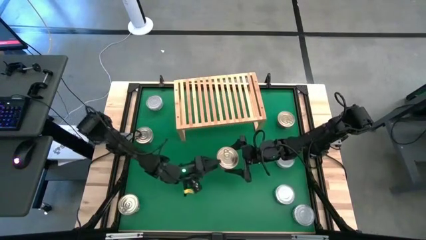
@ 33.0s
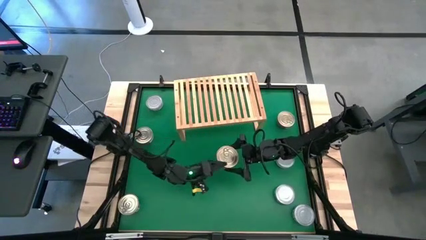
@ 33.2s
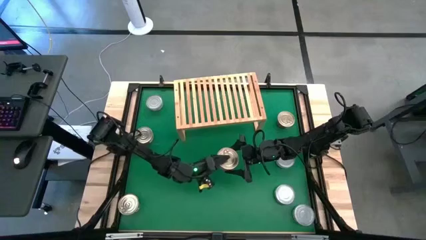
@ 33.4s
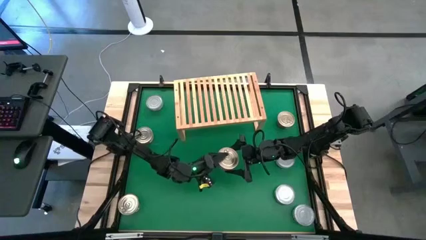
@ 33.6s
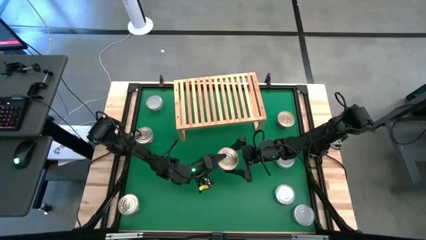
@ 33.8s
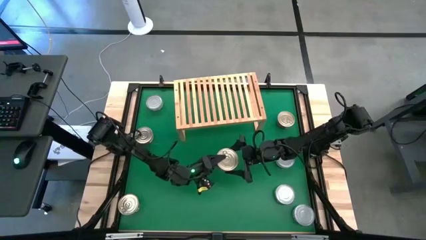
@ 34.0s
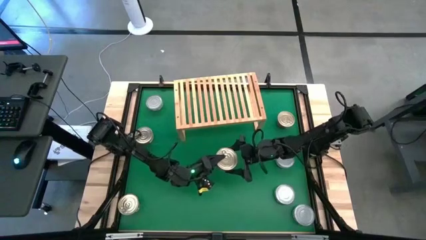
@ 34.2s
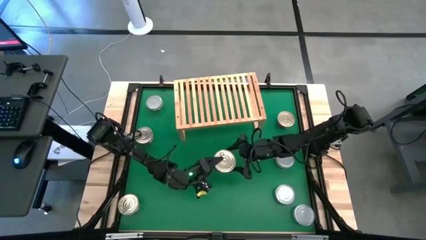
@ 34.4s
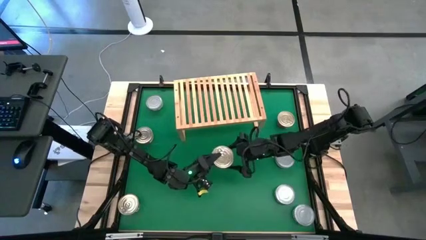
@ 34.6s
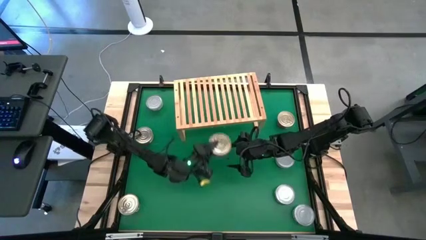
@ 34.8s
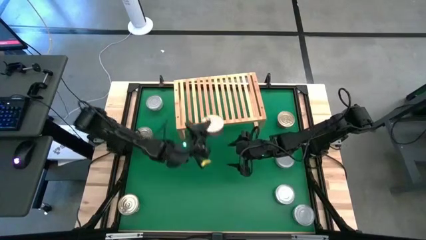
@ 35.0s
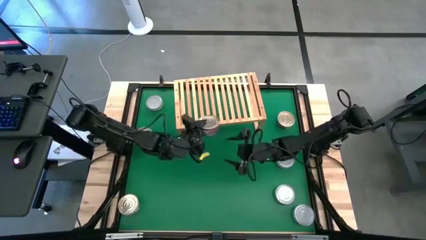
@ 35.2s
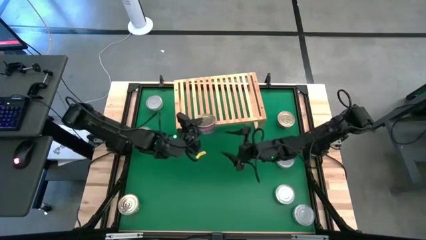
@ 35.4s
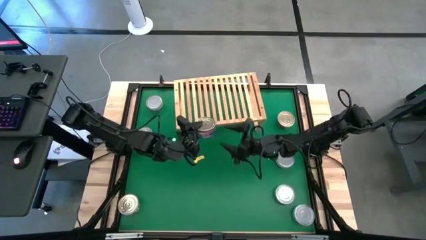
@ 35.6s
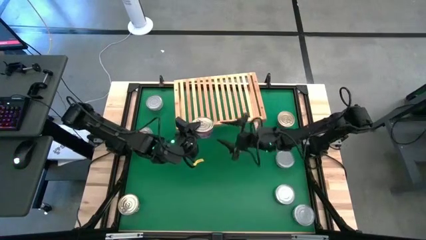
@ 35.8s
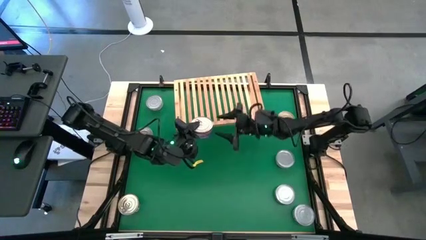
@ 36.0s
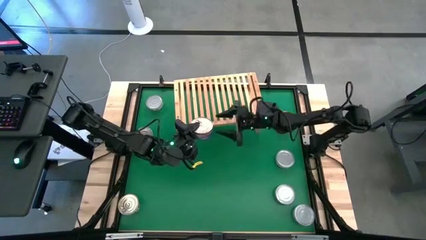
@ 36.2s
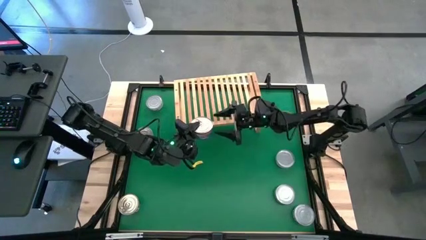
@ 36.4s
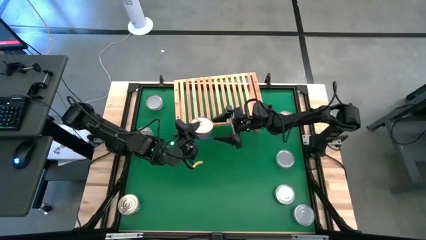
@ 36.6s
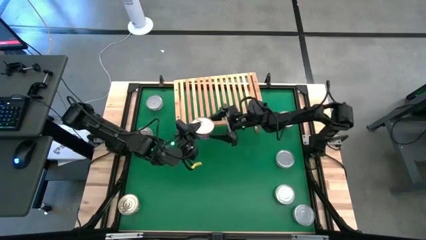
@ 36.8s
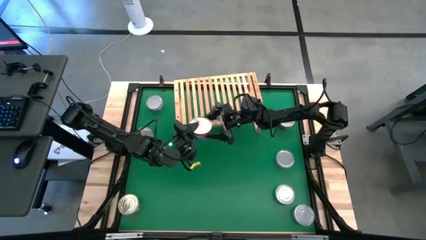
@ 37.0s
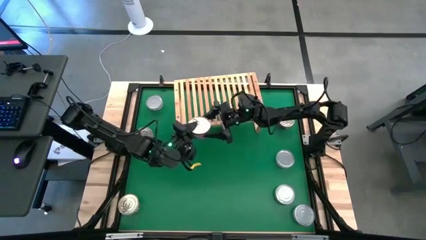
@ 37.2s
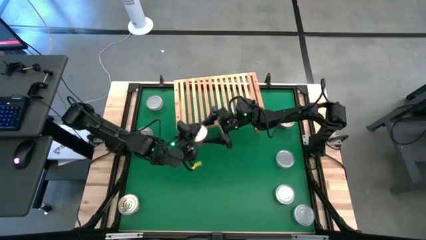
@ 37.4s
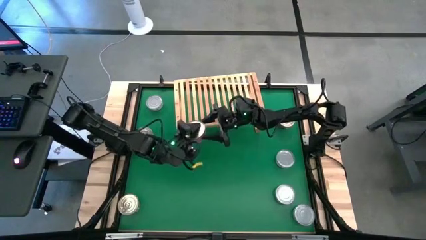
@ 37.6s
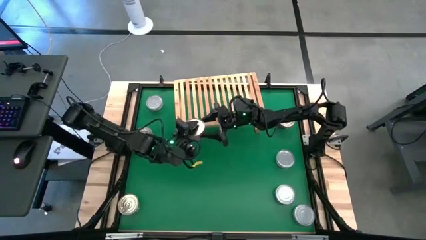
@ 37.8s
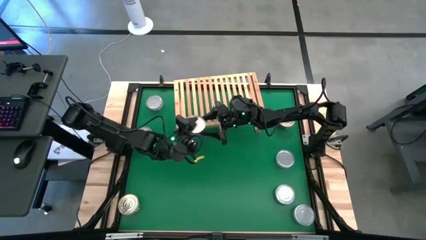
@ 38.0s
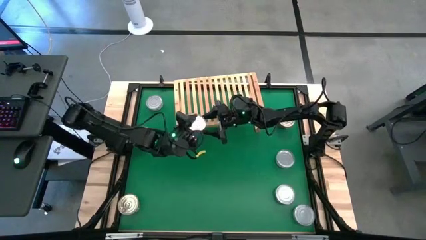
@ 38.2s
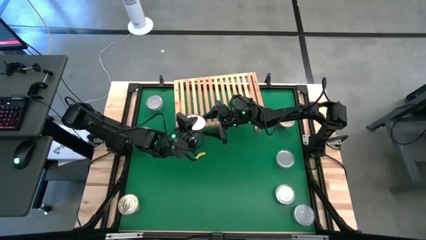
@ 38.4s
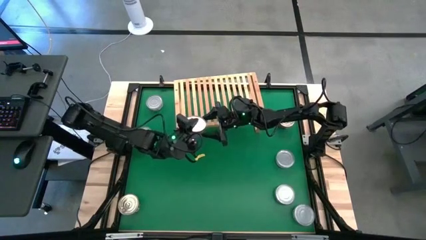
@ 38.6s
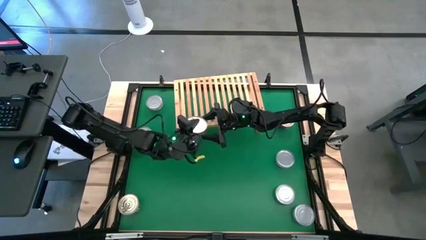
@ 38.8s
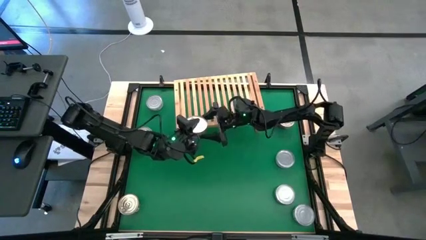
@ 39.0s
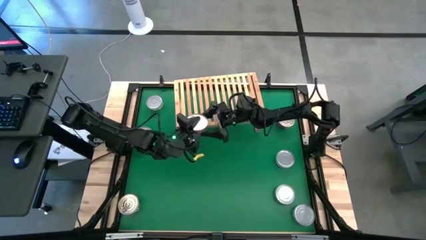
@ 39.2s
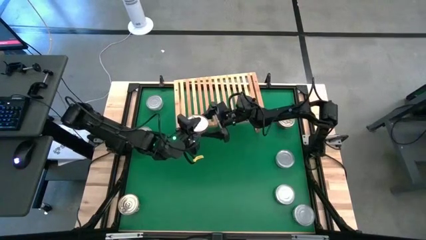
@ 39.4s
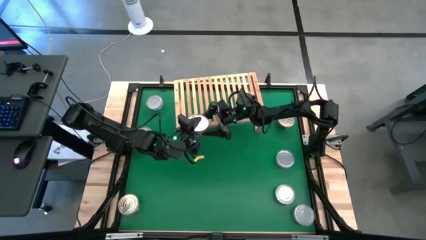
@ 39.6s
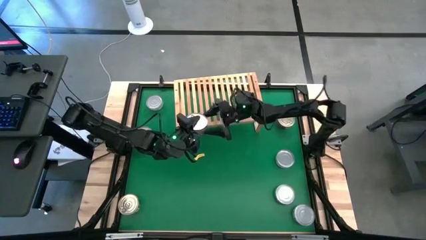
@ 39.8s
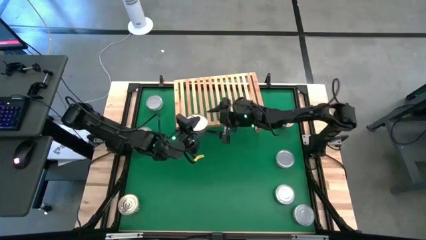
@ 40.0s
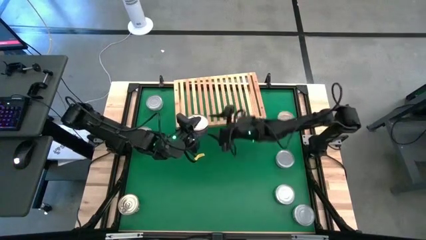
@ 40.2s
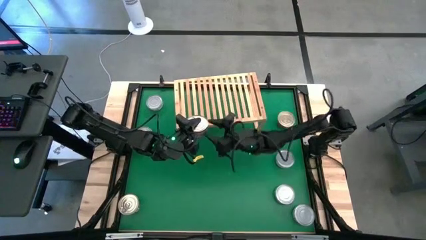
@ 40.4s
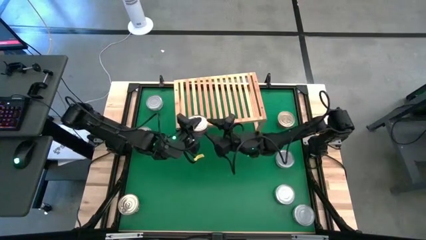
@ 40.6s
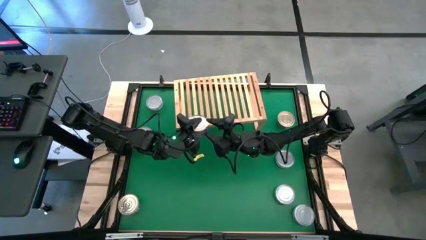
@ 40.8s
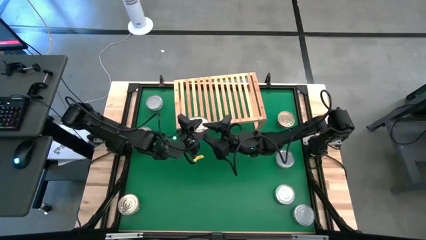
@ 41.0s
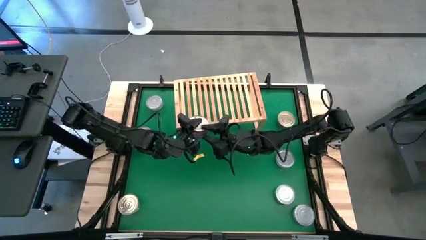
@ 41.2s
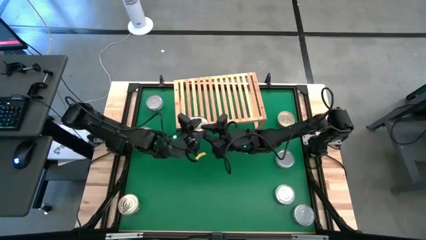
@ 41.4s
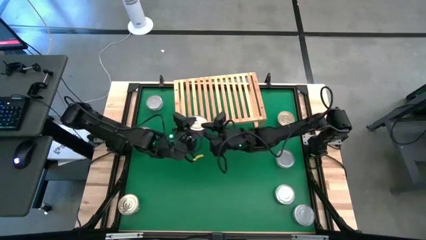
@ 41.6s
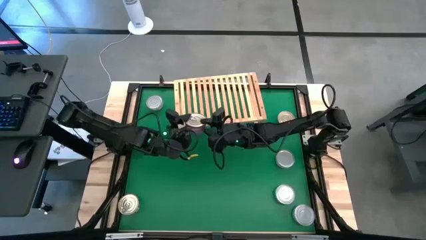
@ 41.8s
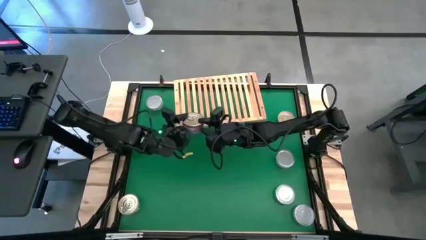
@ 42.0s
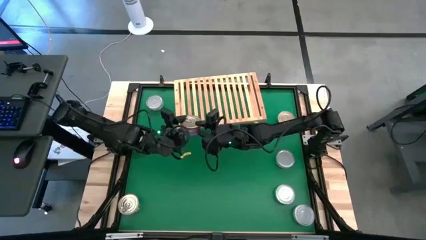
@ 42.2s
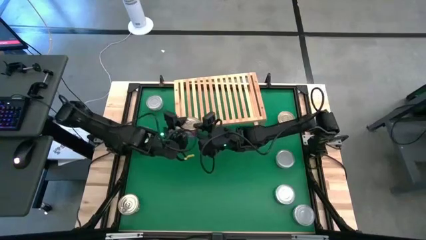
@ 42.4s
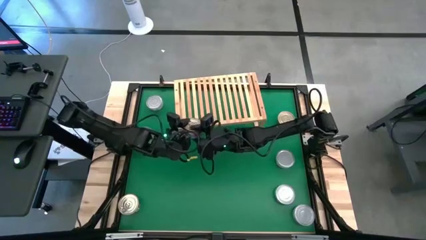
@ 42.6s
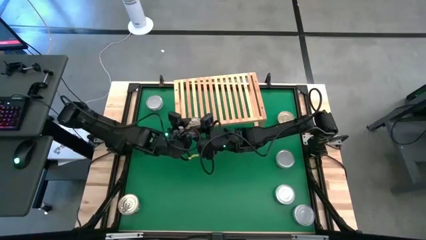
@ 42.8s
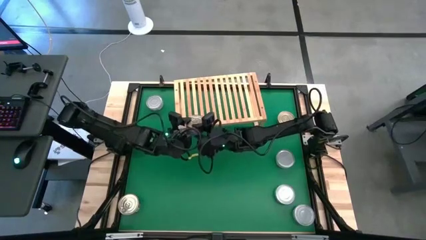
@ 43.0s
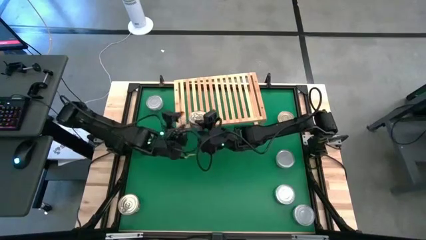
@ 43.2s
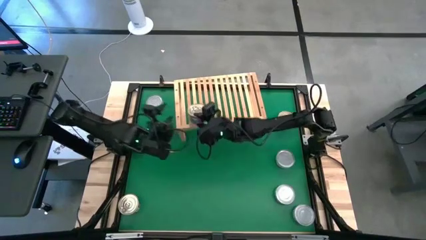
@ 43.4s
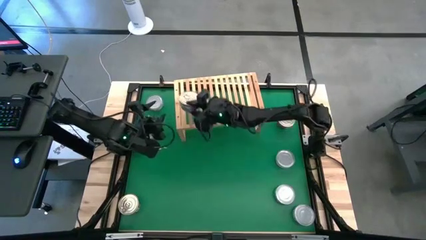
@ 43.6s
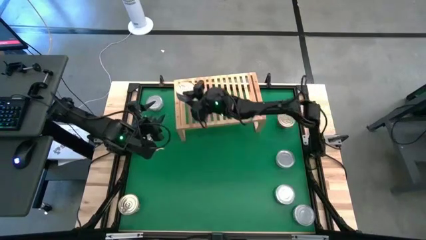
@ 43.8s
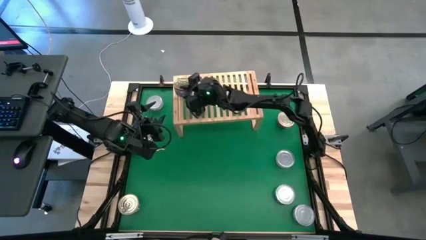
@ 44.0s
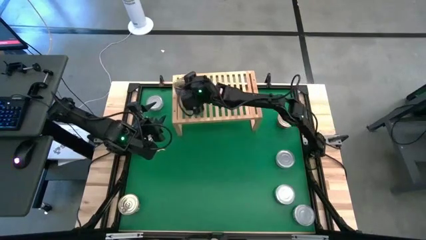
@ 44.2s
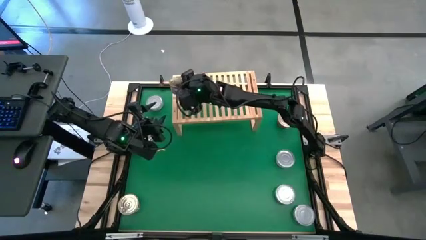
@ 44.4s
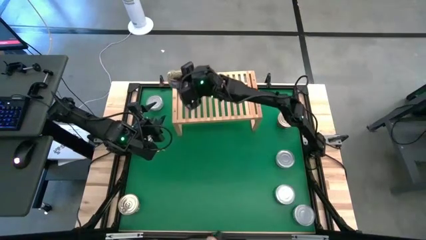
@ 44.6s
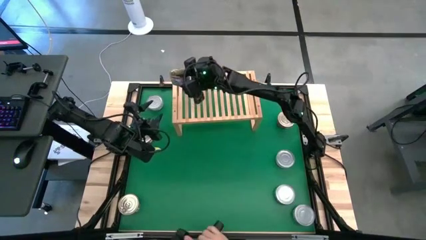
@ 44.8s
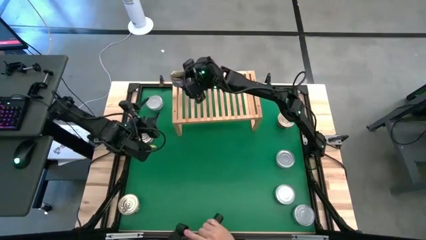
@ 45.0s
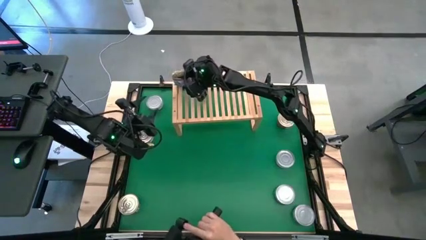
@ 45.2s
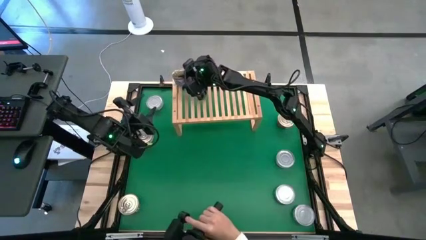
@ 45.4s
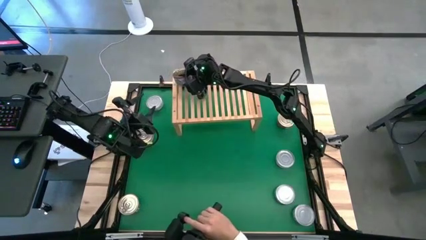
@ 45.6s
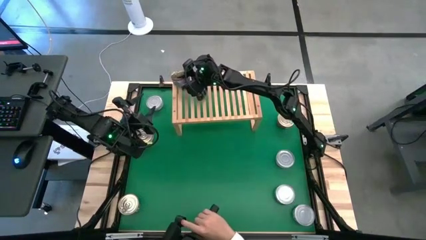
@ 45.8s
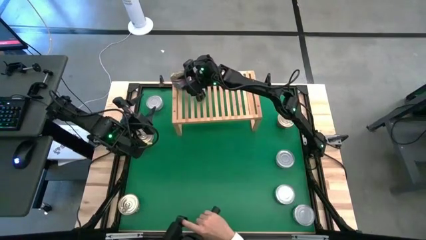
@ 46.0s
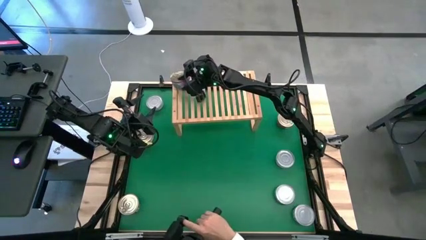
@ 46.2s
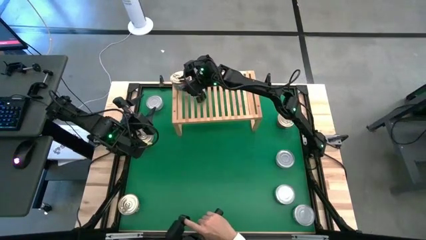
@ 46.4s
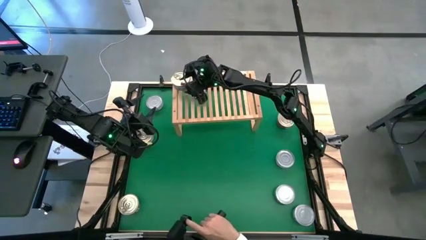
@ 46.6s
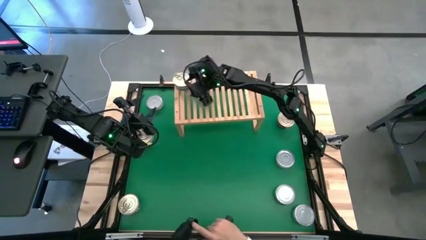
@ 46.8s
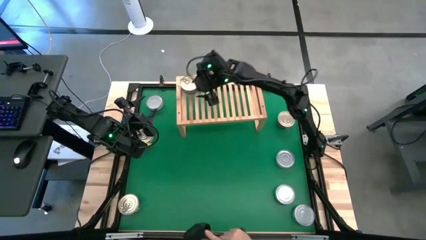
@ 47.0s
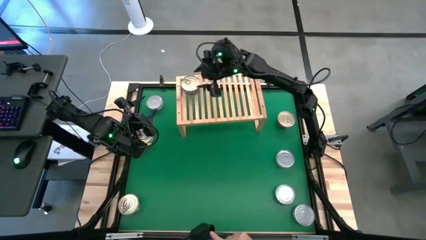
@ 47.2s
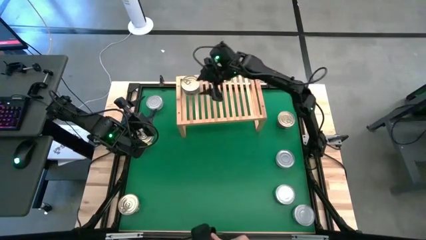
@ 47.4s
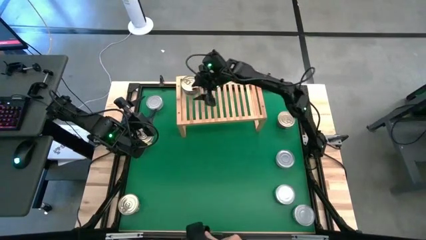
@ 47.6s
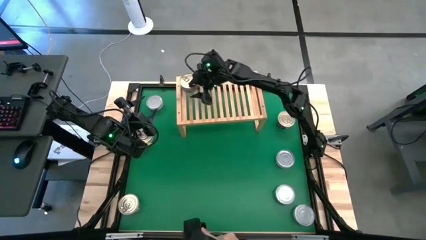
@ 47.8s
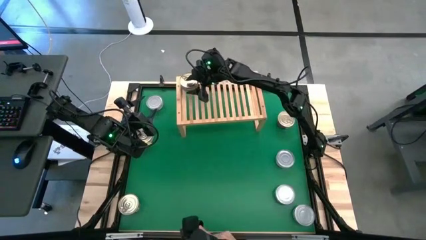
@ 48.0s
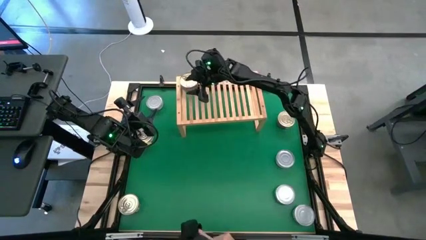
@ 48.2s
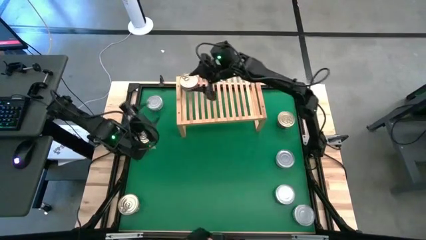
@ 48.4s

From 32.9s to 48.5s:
Task: Stack canned seafood by type on shelf
Put the center blue tuna can on the shelf

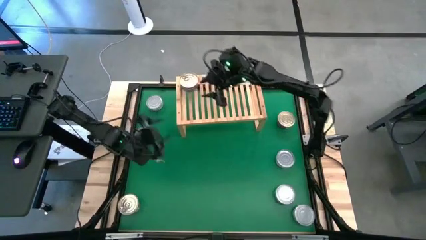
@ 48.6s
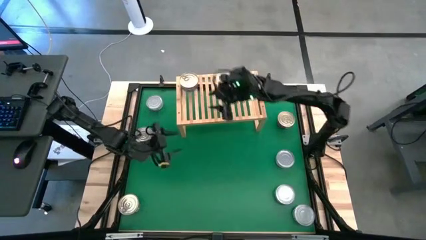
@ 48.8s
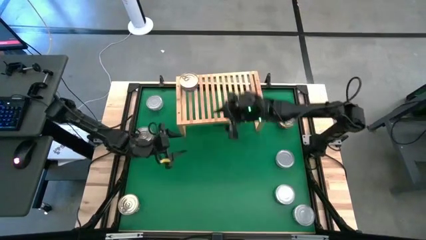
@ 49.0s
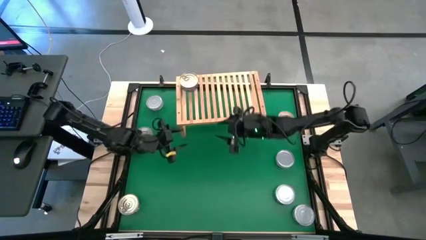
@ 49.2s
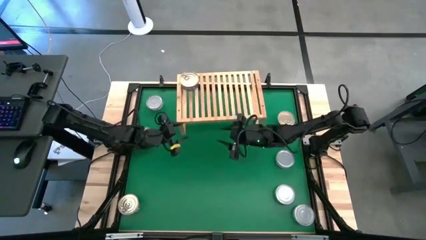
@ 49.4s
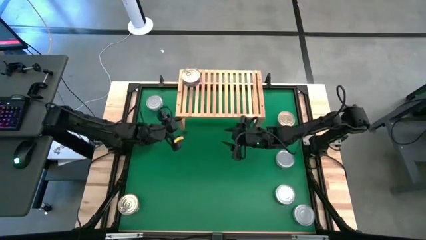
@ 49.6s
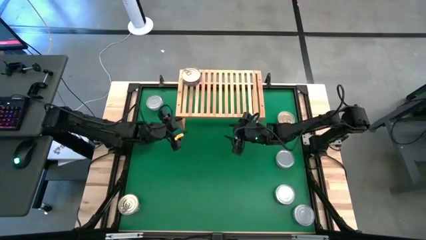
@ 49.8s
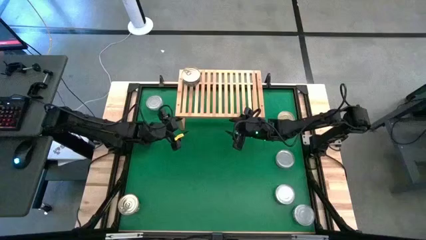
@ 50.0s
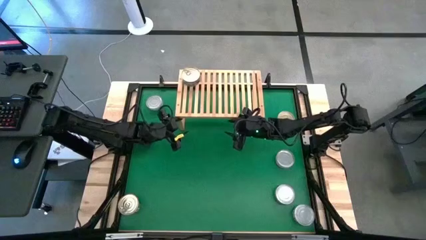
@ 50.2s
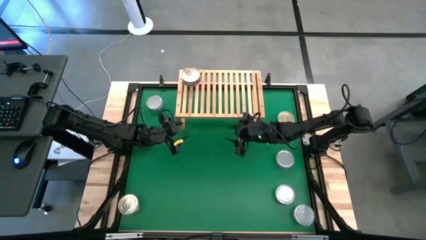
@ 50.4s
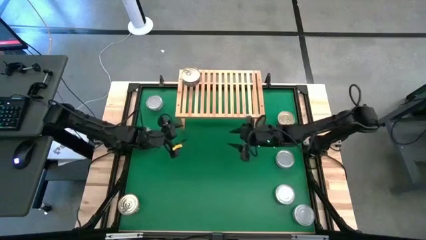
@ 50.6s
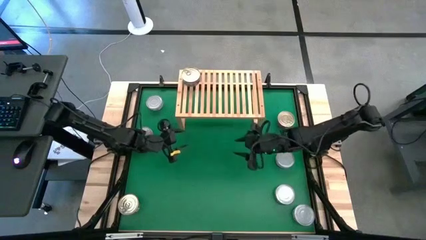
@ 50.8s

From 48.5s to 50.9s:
Adjust the shelf
